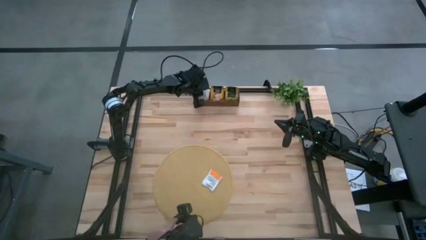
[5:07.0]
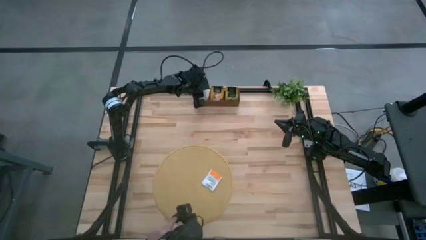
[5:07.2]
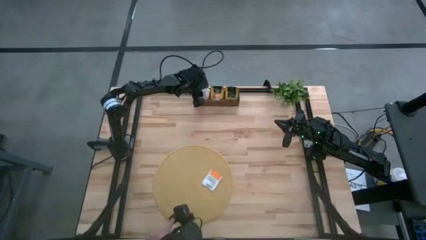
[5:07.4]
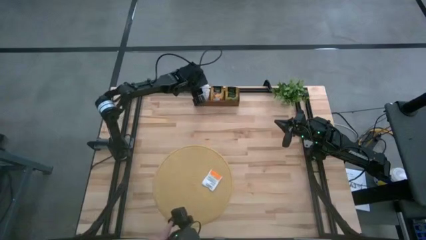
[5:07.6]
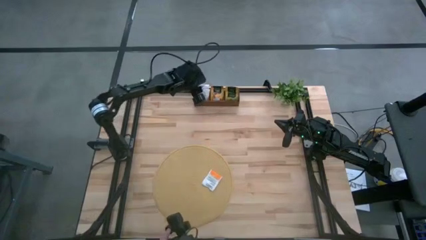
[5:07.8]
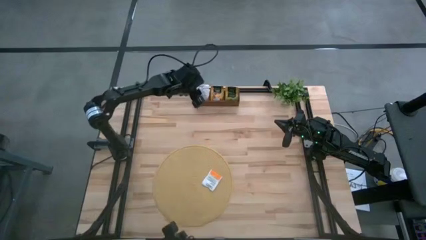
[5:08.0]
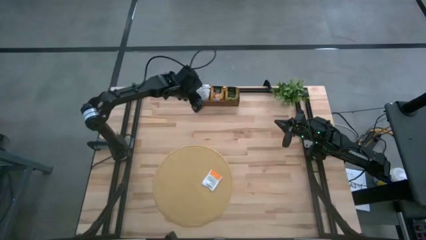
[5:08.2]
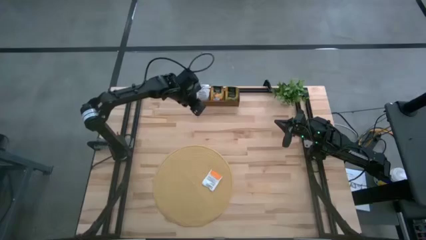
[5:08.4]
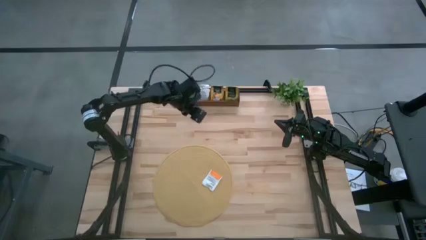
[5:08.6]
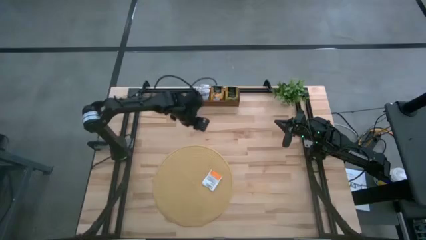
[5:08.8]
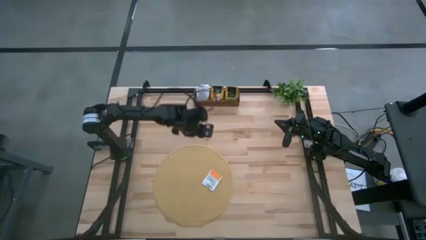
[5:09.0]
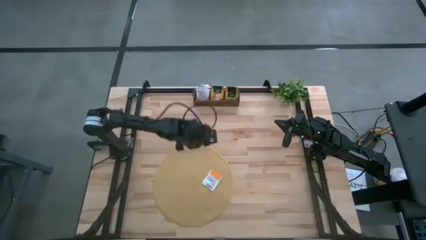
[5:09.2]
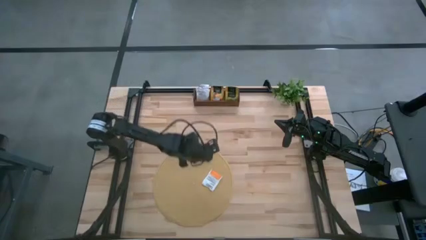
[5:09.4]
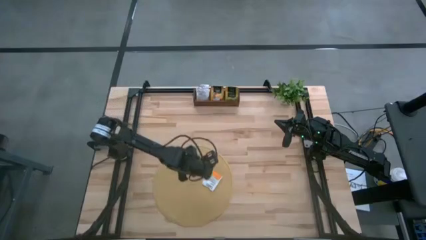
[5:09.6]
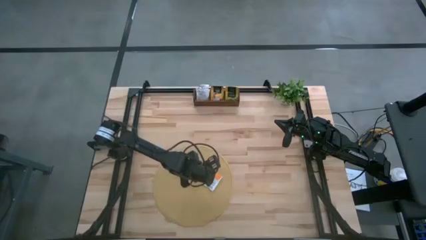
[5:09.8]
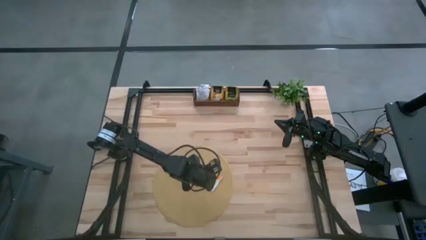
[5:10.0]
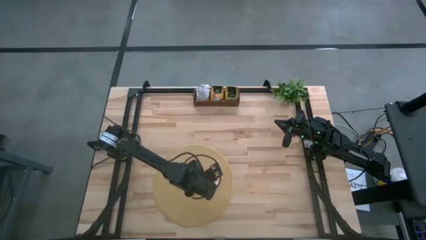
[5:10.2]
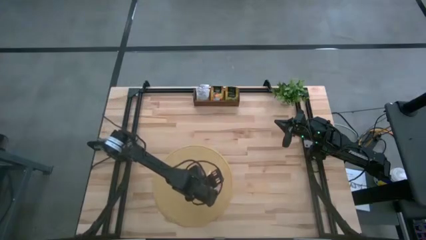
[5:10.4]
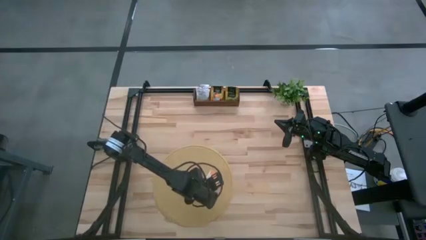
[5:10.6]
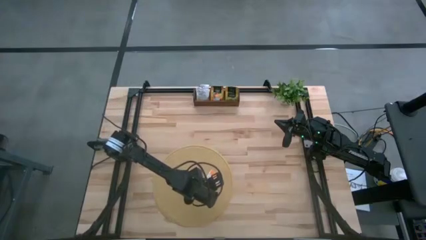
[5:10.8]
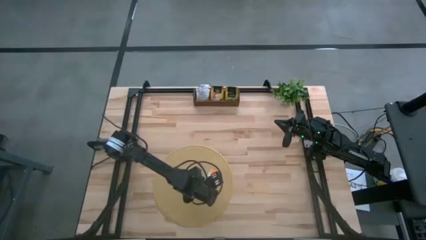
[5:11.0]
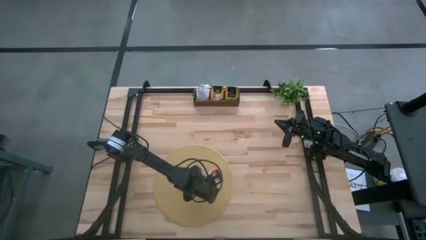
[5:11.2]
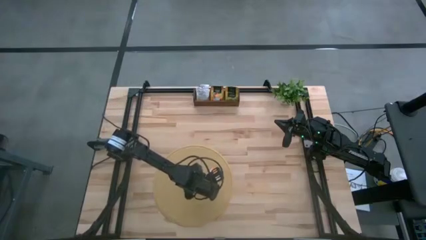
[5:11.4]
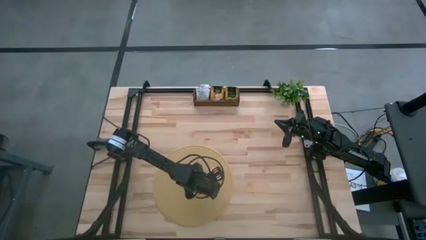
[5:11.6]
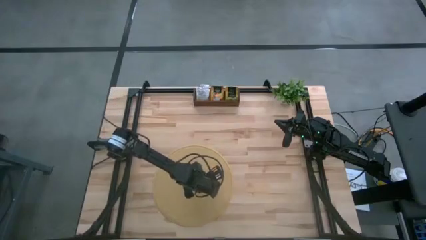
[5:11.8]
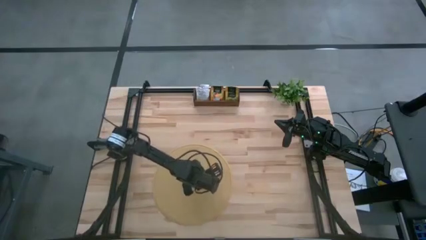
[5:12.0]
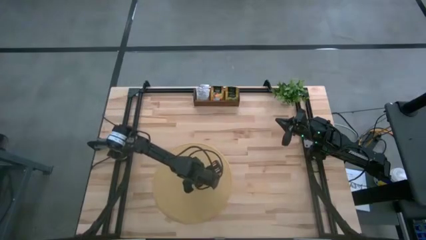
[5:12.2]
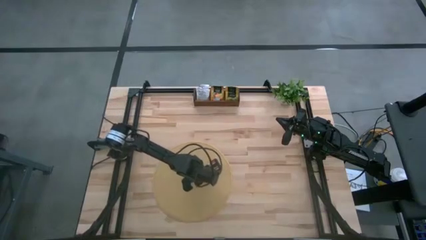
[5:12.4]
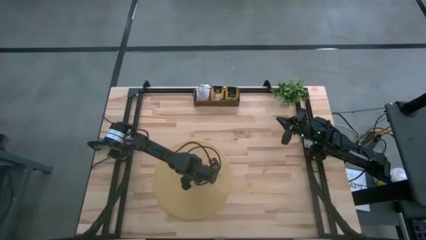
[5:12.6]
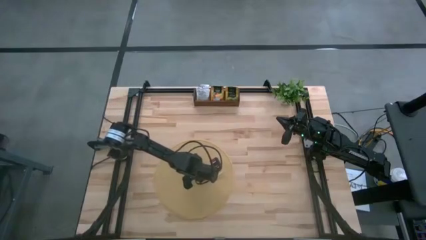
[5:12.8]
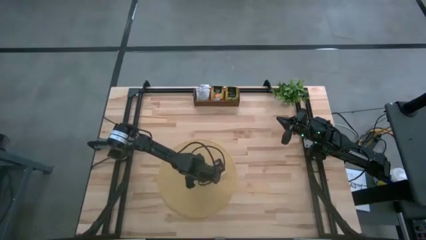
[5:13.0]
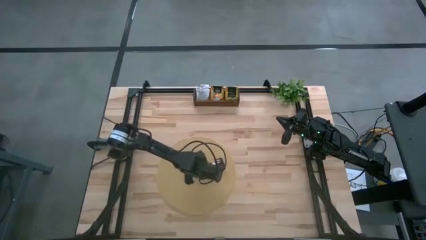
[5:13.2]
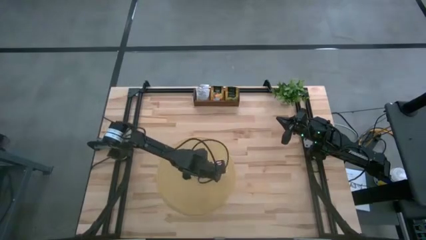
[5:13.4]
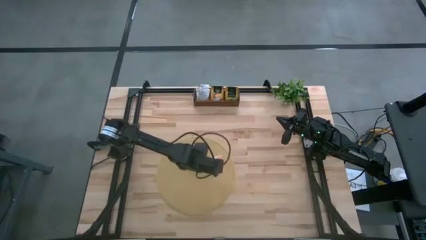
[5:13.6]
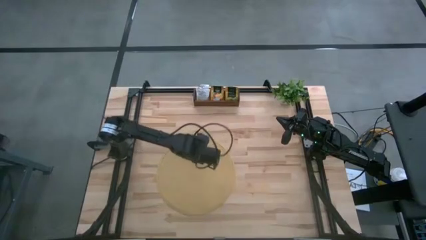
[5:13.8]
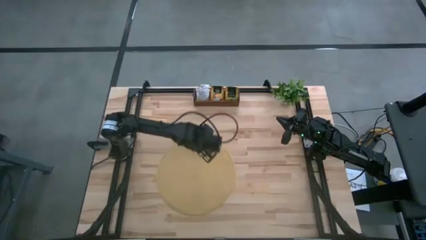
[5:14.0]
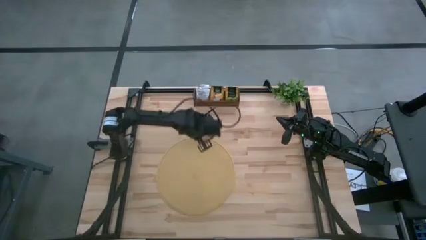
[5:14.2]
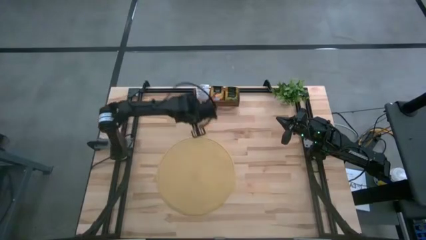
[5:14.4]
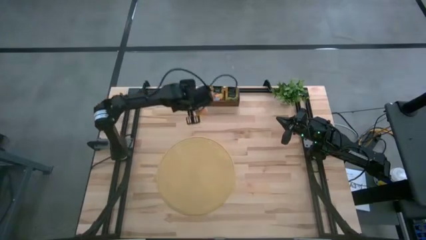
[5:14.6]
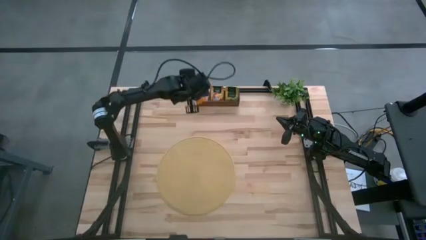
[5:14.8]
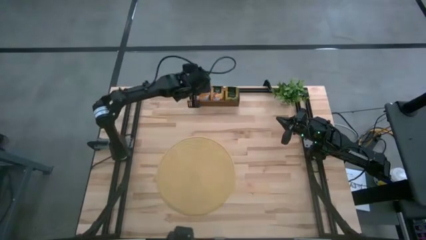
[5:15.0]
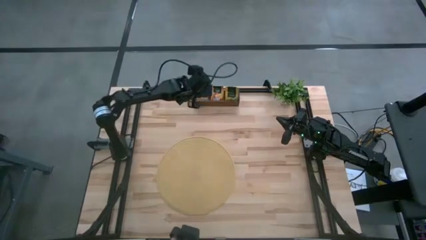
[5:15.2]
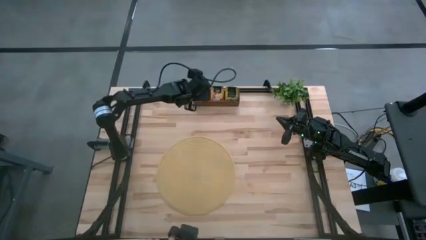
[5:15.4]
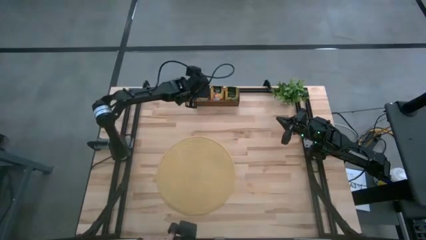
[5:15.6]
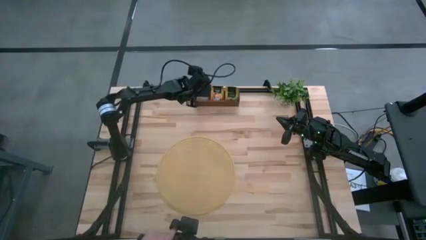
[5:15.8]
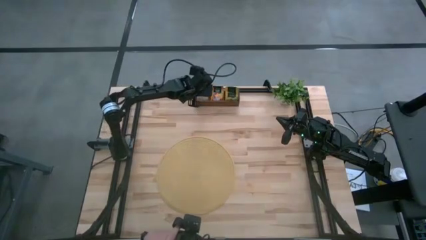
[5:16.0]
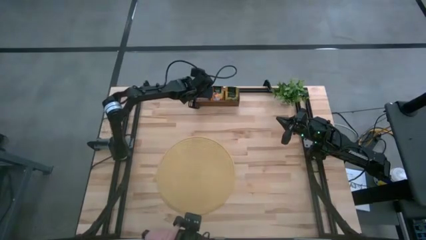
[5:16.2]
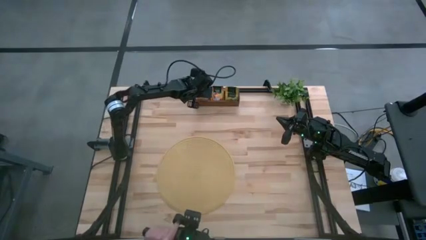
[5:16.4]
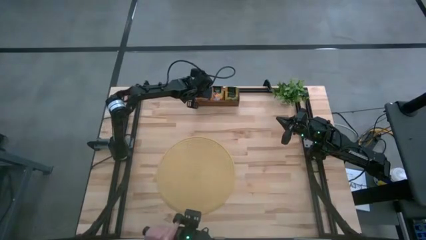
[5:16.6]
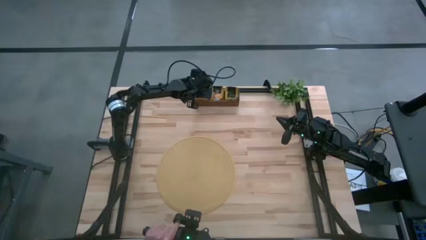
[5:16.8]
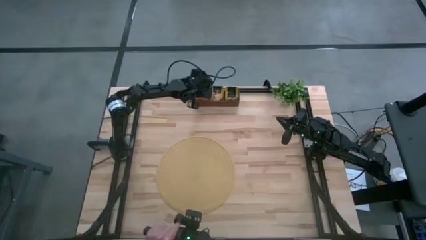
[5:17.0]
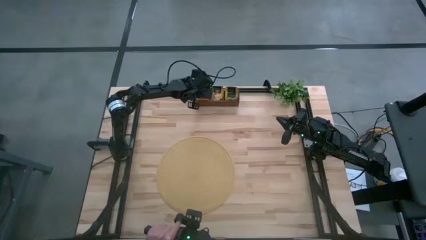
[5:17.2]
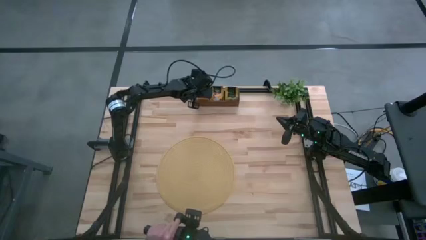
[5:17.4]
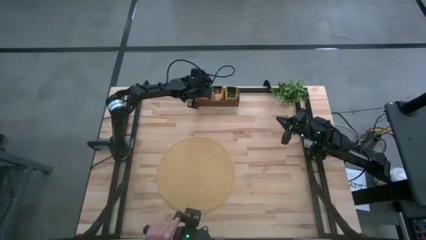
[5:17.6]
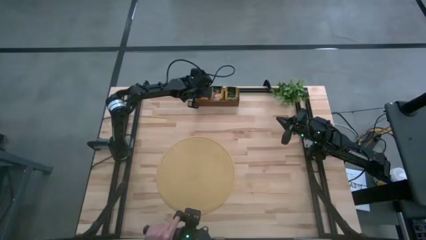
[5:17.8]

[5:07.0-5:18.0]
Task: Pick & Place Tea
Put the white tea bag into the left slot of the wooden organizer

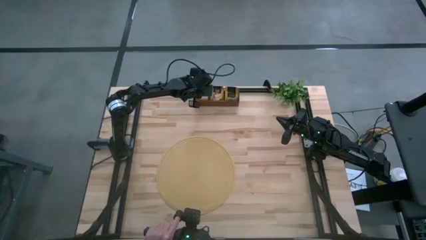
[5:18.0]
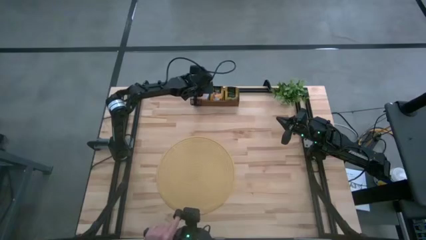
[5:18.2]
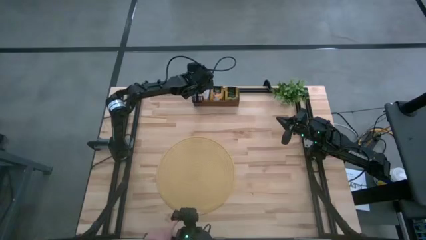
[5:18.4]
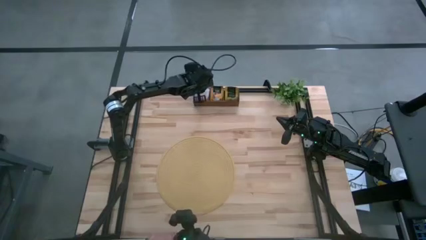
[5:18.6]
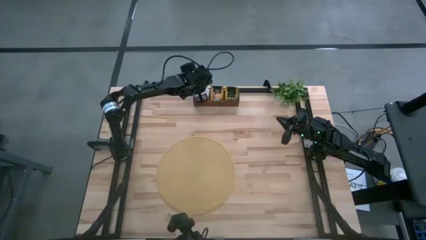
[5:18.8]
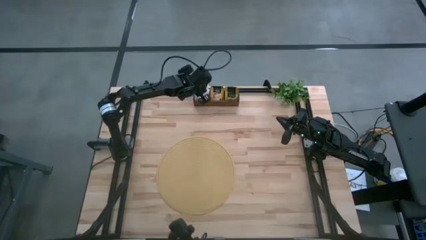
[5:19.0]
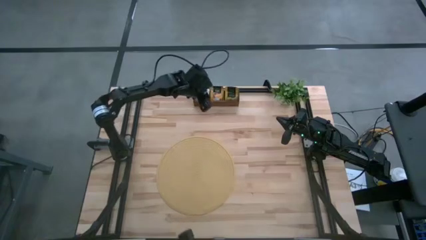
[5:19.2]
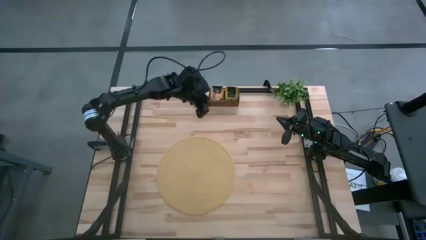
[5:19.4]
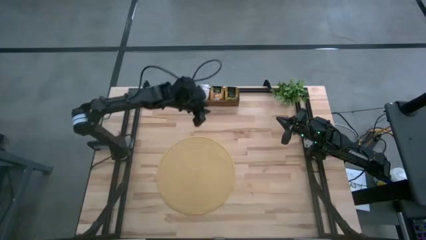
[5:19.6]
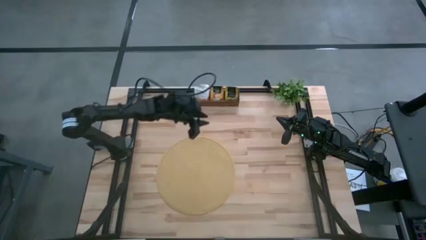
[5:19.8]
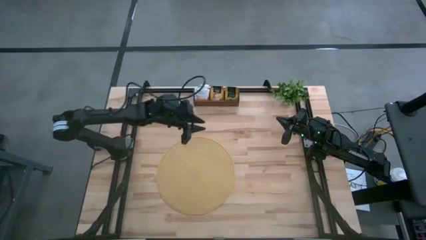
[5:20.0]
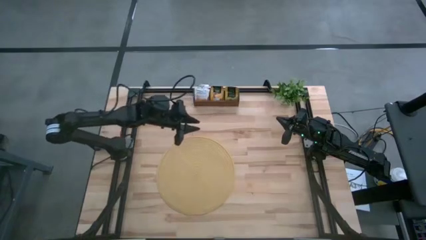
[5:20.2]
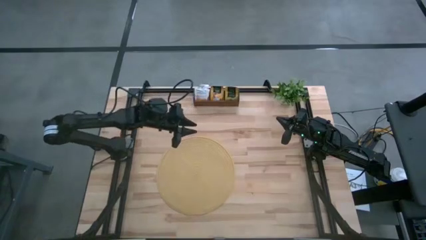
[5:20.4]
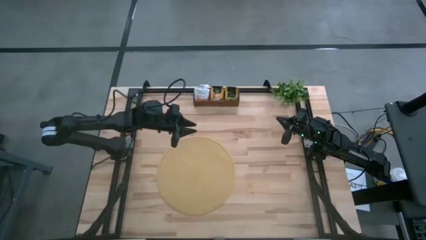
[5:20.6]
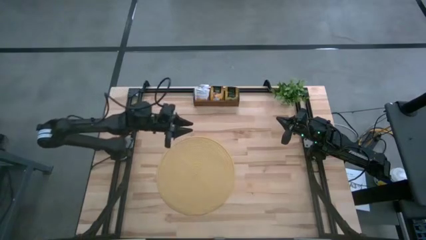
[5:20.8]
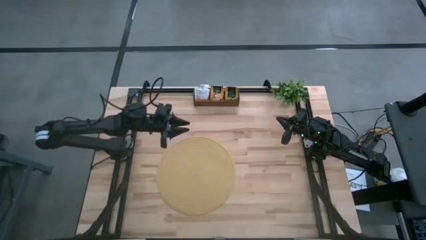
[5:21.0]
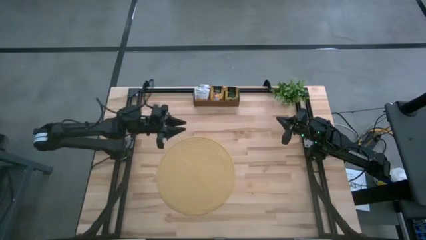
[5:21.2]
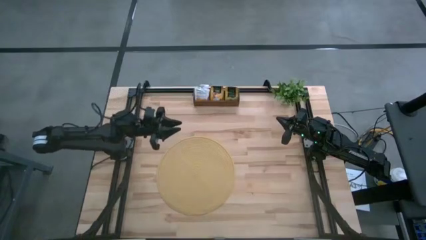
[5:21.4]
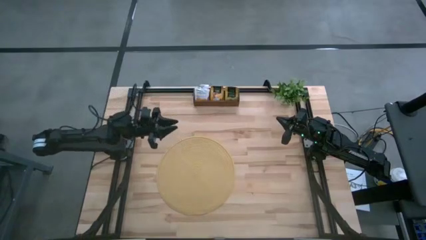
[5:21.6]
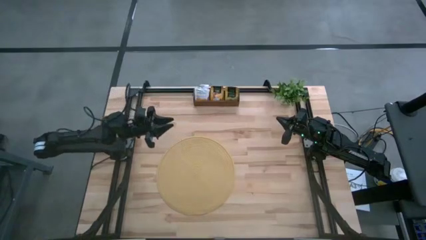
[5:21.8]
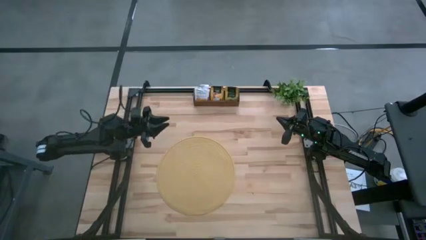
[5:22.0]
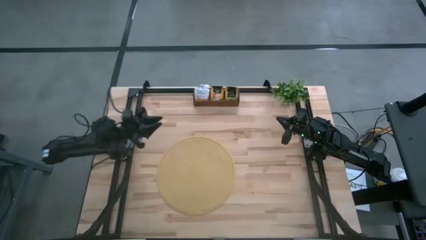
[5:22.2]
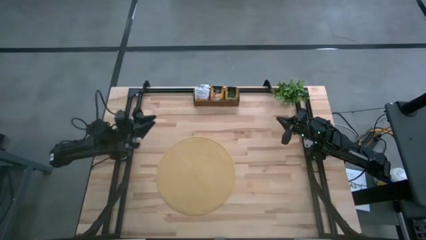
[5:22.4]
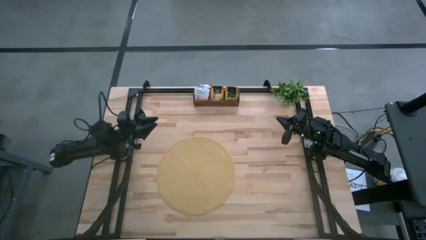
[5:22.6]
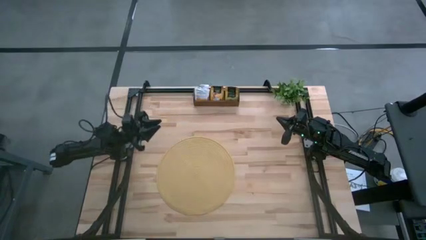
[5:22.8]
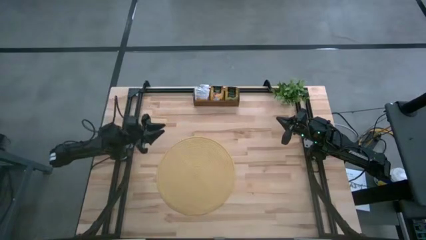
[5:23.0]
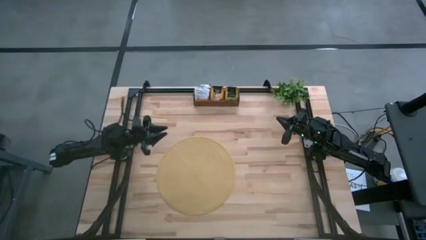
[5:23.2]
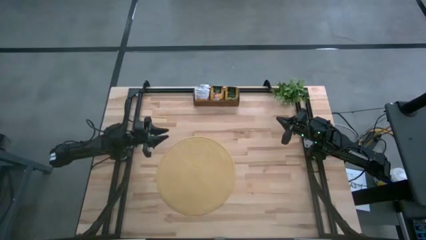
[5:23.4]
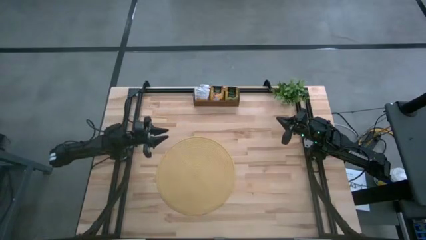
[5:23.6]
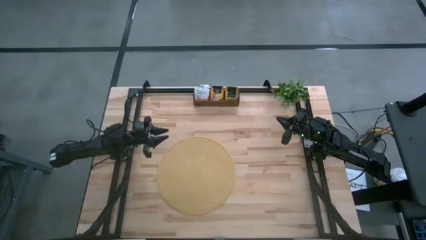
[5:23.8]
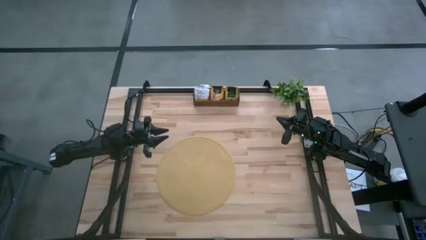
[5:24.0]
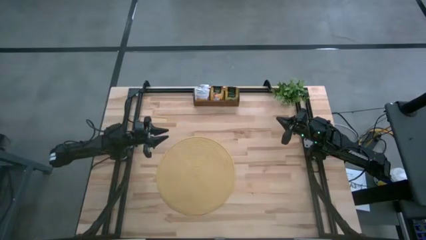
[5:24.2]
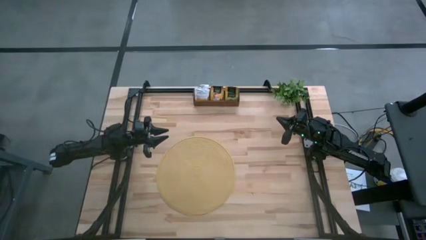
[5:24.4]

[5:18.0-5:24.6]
Return to Home Position
